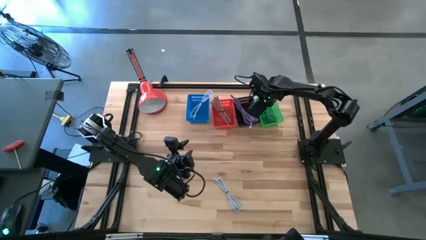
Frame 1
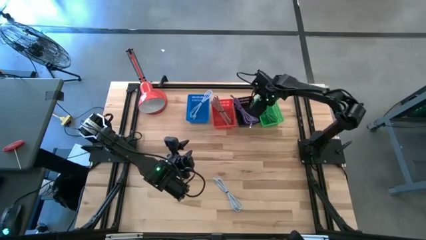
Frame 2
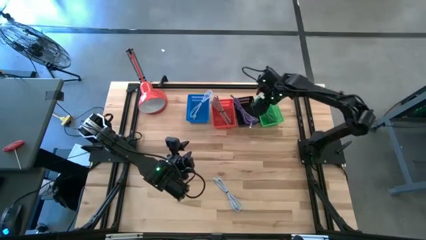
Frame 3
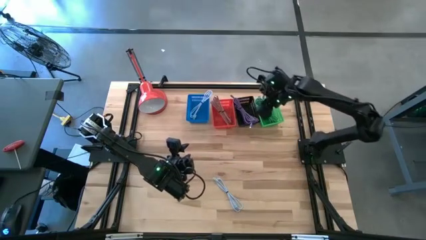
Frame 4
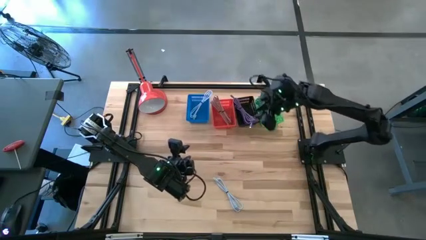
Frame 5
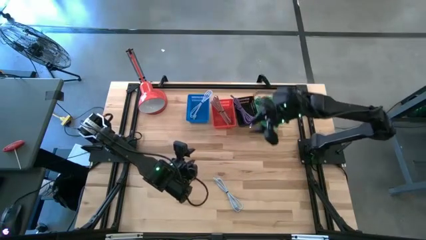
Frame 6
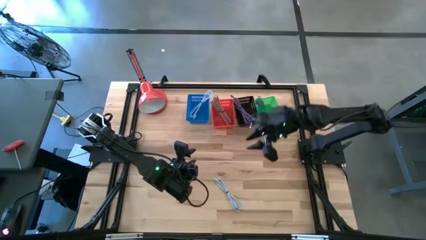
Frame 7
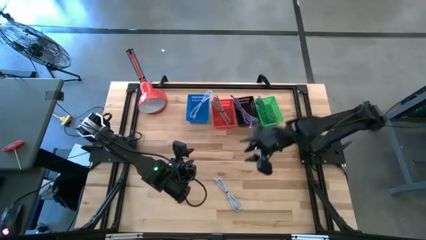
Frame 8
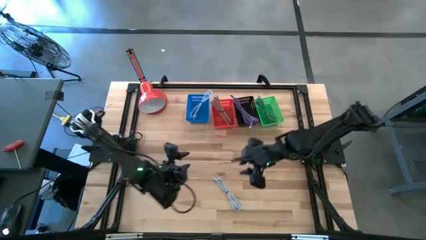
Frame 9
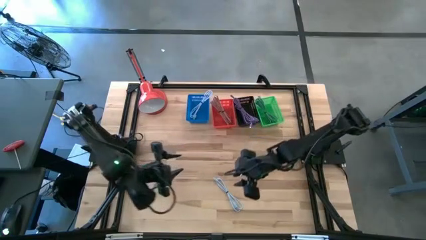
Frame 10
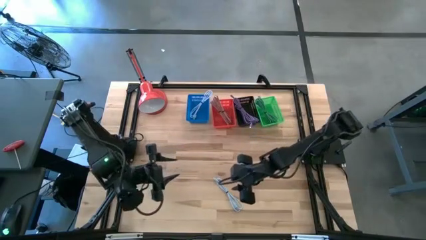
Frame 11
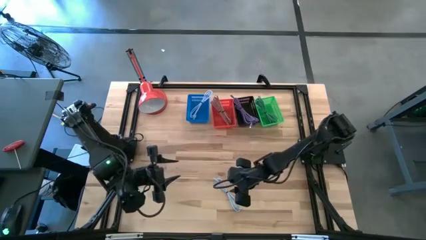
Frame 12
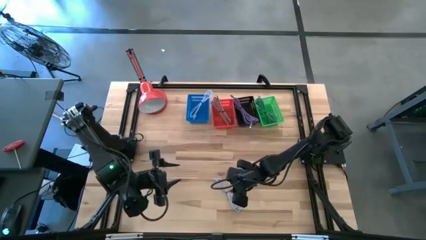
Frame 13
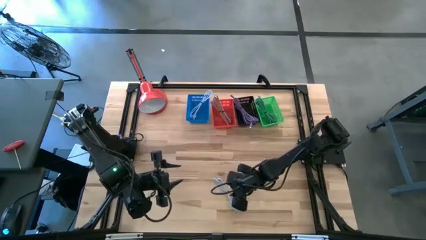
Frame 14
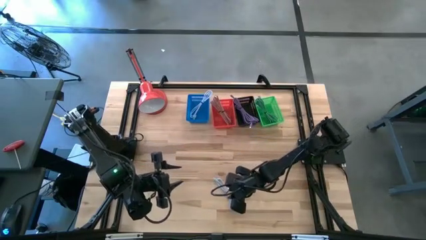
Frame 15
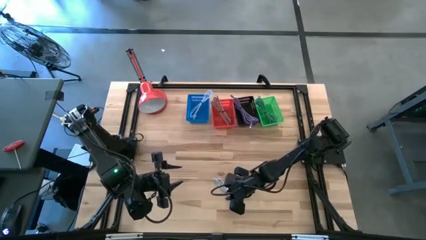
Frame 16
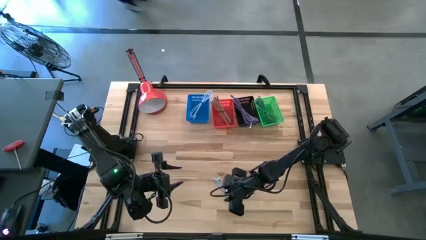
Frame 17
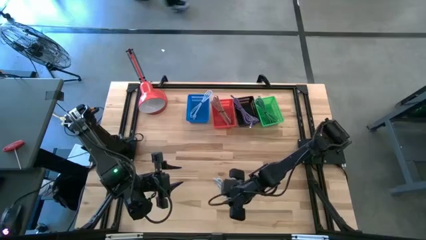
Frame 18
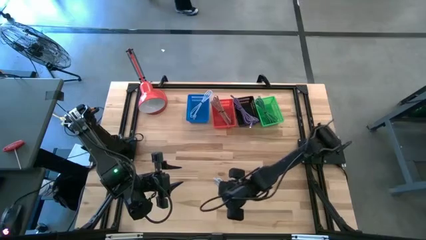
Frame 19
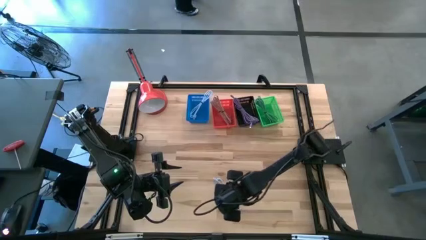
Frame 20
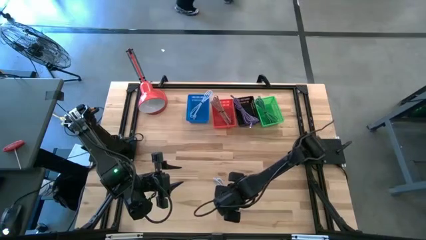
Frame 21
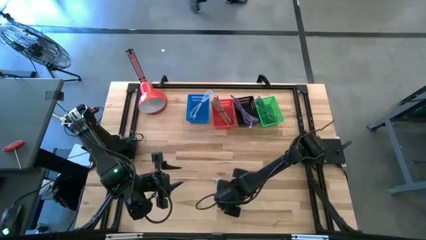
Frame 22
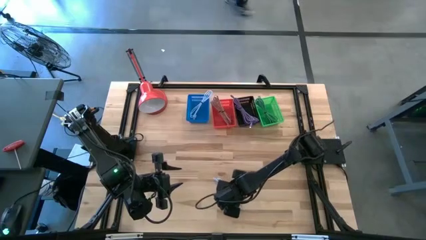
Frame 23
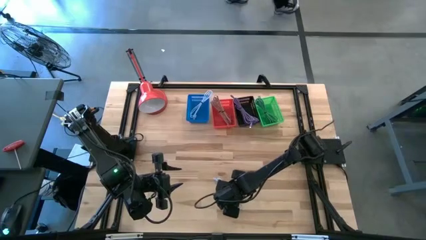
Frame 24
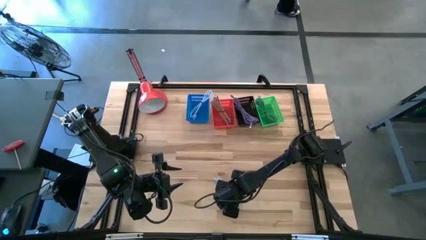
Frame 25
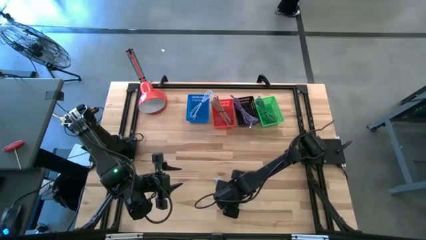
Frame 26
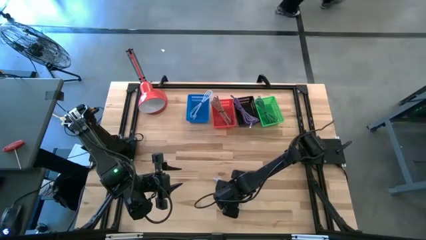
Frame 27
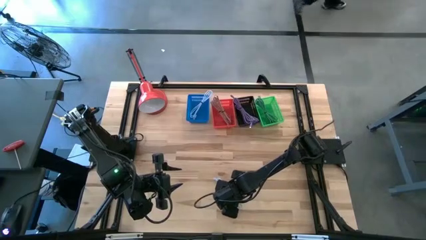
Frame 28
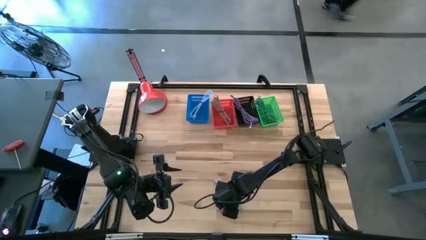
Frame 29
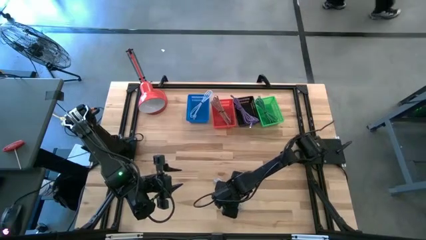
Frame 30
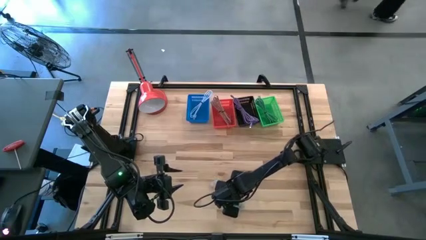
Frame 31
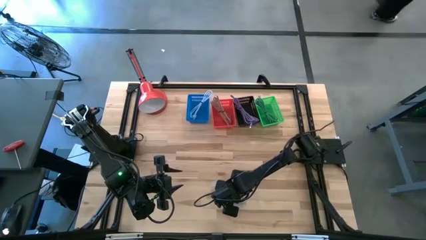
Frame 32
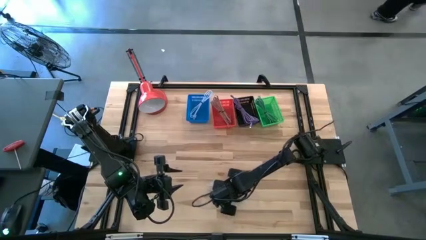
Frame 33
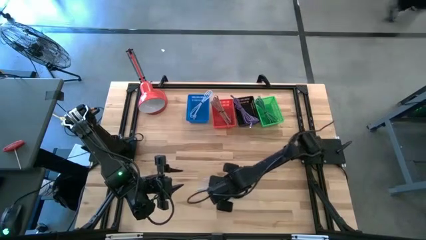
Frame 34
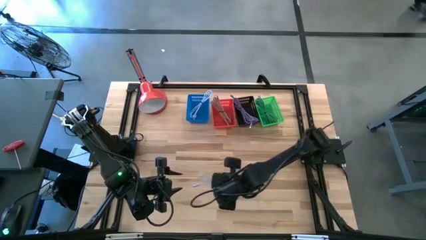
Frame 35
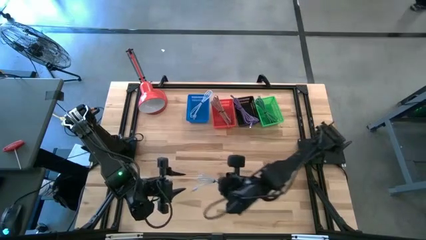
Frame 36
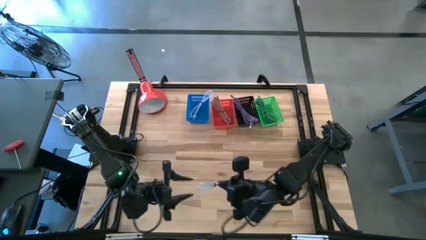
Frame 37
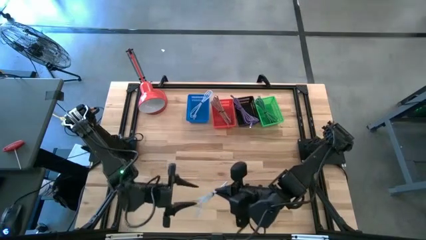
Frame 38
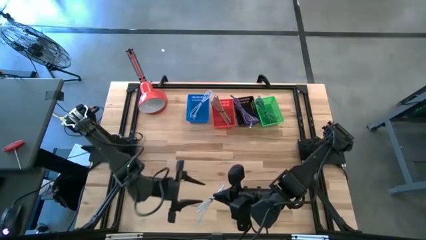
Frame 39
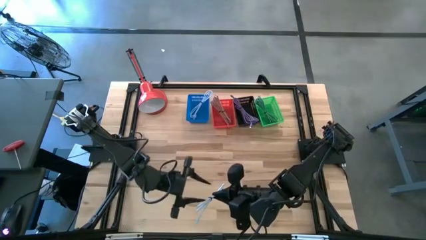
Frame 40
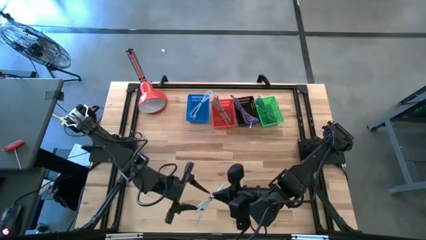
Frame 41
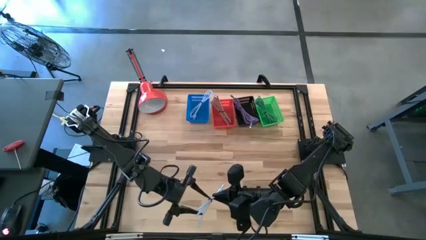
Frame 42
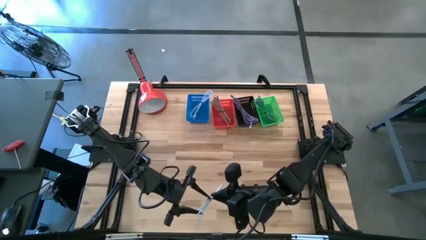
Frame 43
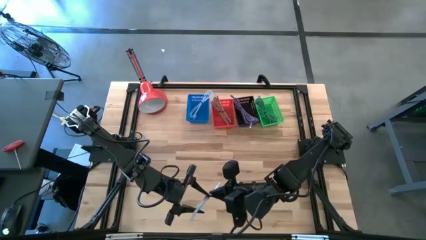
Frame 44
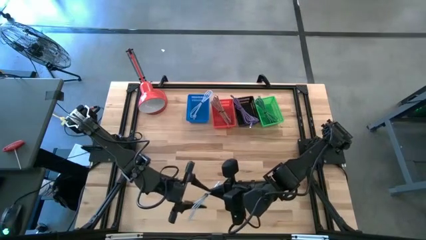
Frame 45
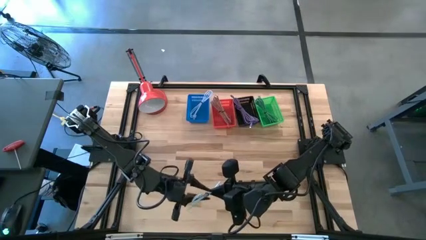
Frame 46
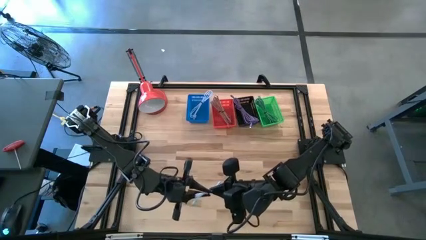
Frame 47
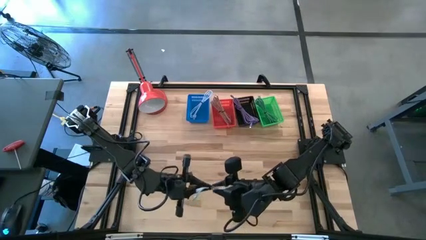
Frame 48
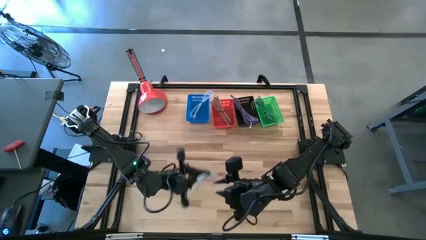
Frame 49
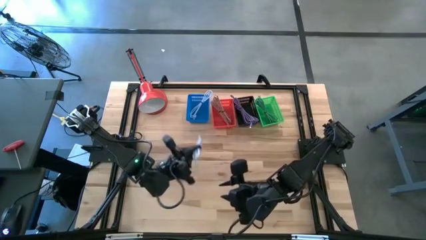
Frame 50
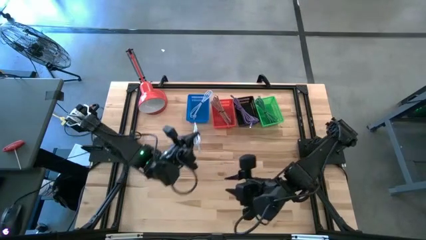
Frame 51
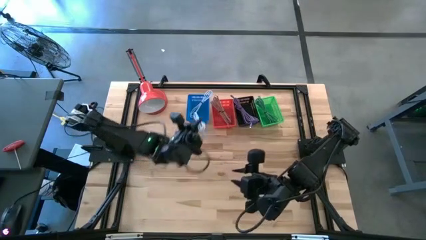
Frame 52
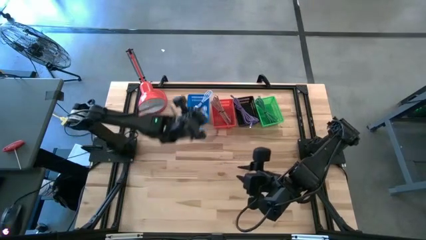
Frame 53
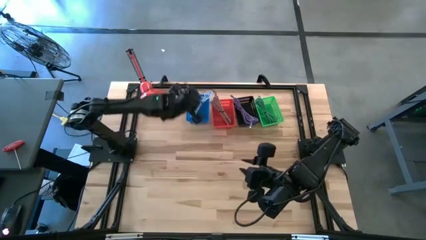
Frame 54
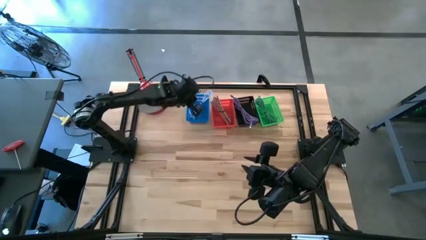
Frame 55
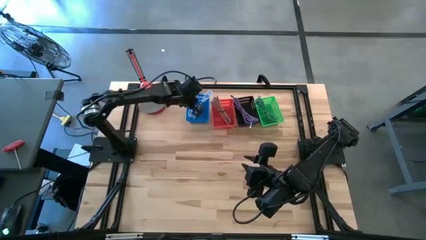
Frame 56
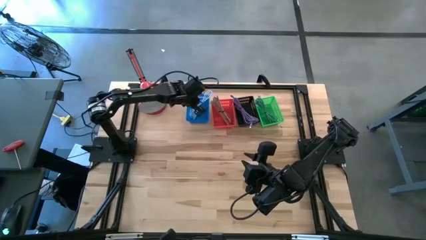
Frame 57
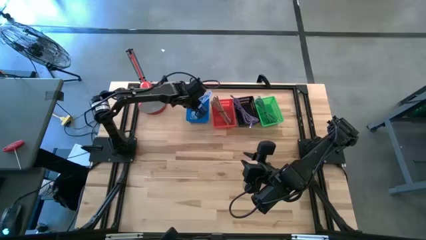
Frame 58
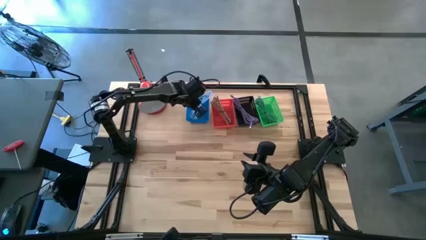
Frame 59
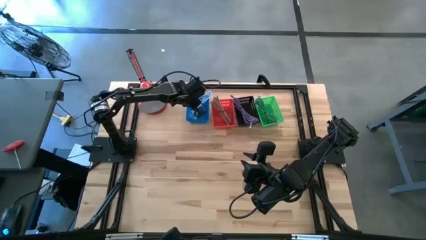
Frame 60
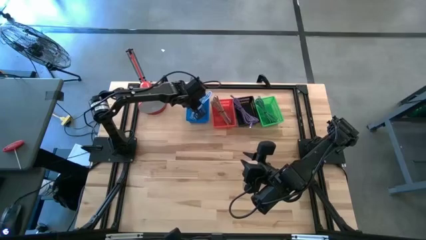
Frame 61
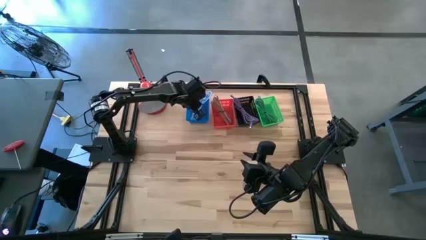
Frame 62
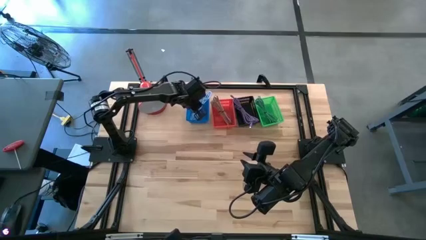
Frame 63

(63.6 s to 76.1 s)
Task: Pick & Place USB Port
Put the white charger cable into the blue bin
